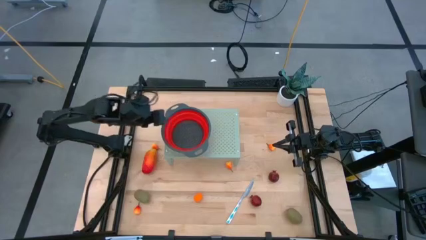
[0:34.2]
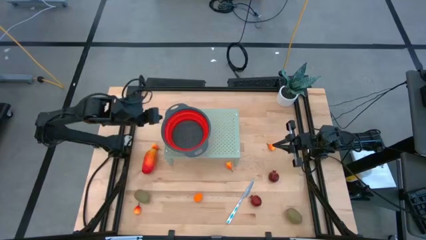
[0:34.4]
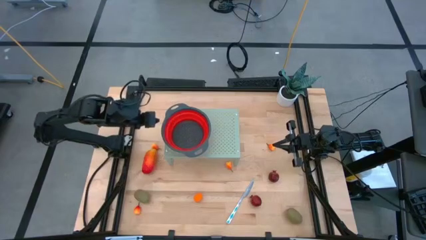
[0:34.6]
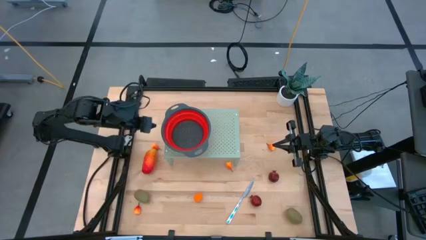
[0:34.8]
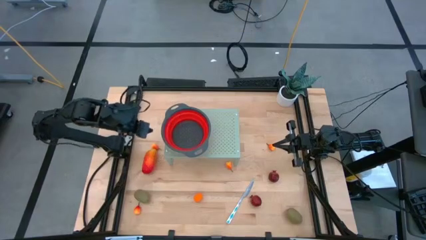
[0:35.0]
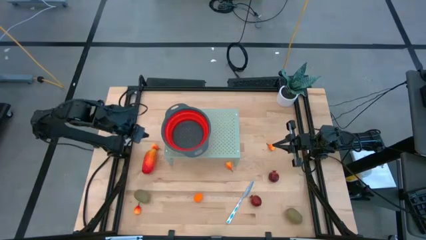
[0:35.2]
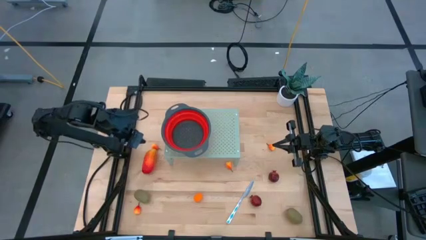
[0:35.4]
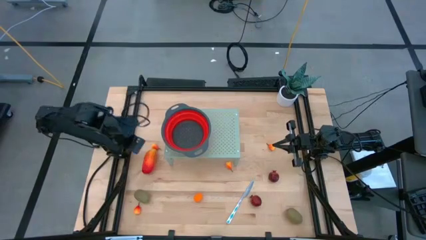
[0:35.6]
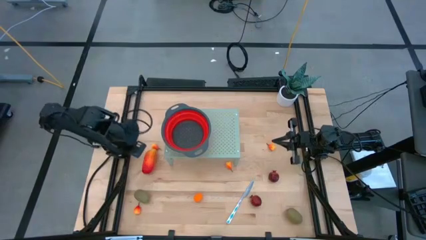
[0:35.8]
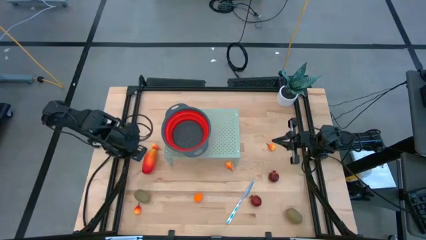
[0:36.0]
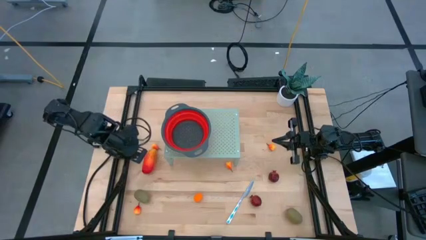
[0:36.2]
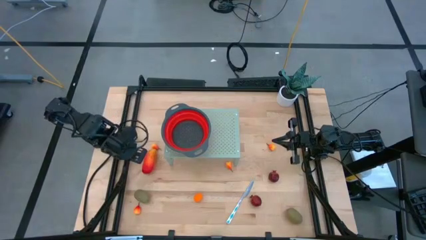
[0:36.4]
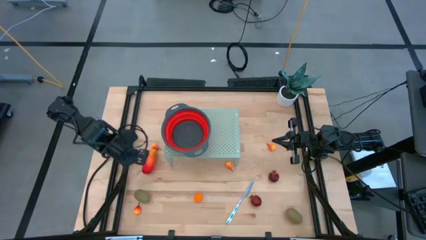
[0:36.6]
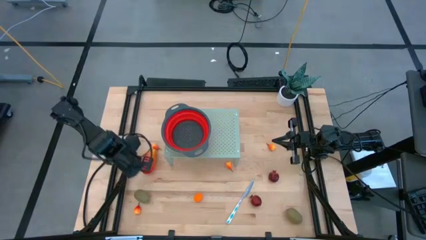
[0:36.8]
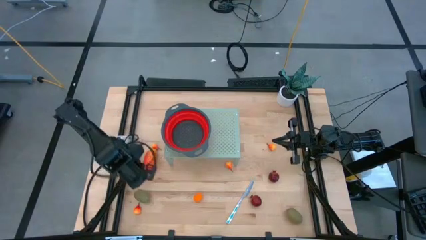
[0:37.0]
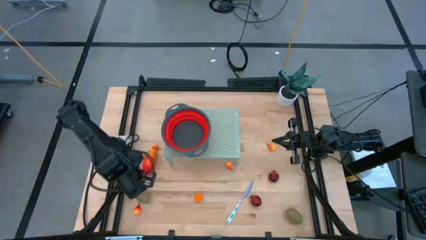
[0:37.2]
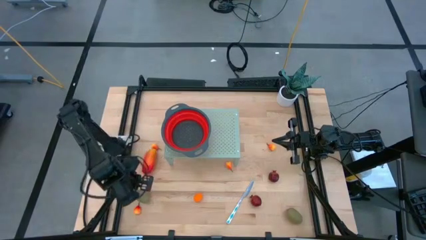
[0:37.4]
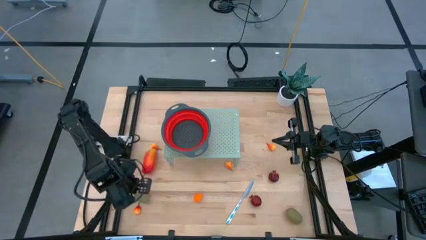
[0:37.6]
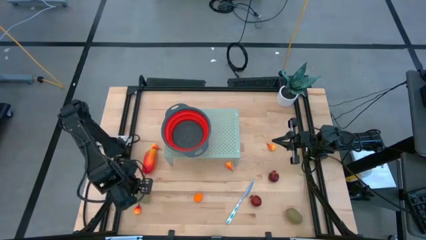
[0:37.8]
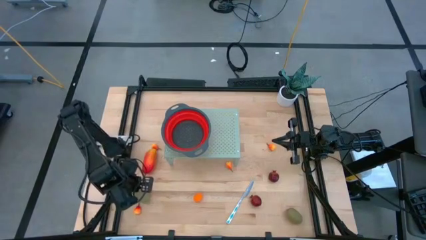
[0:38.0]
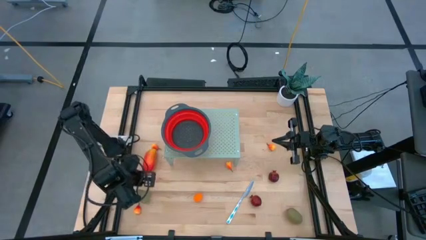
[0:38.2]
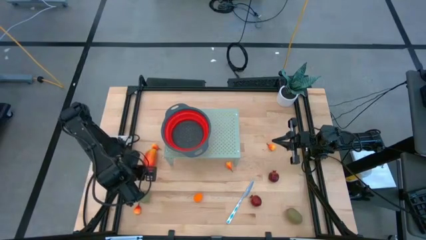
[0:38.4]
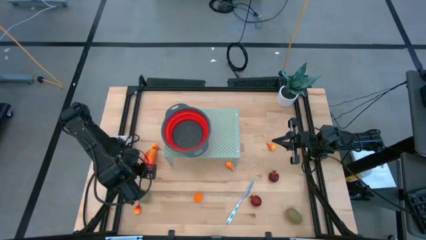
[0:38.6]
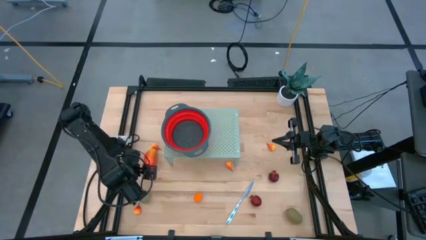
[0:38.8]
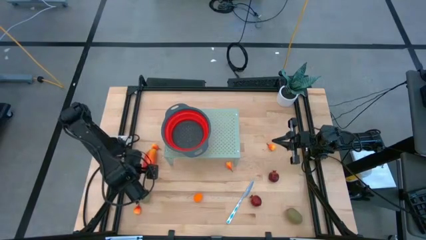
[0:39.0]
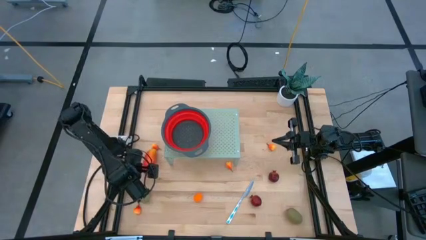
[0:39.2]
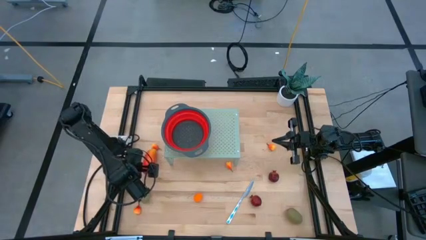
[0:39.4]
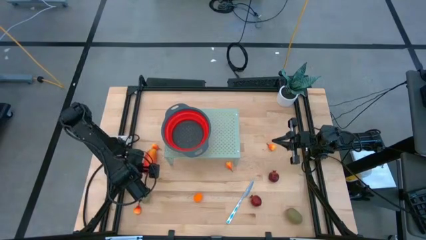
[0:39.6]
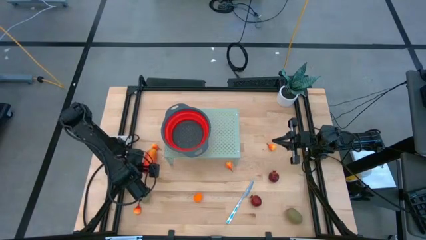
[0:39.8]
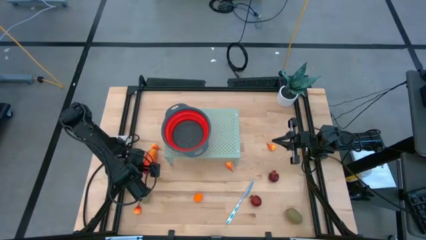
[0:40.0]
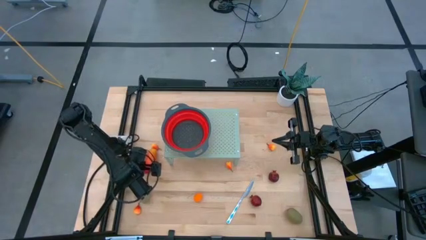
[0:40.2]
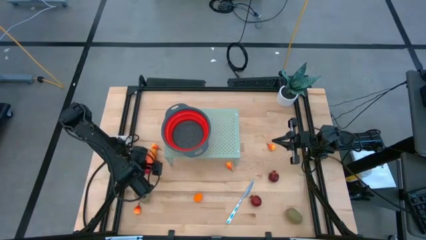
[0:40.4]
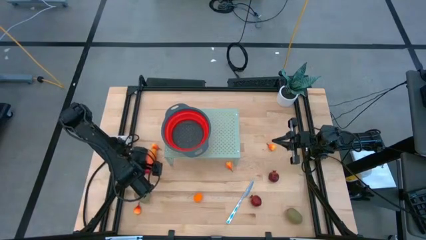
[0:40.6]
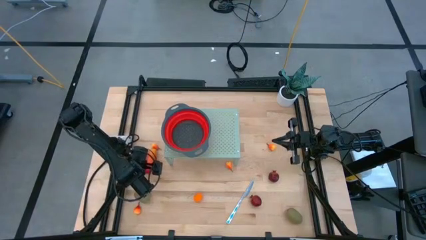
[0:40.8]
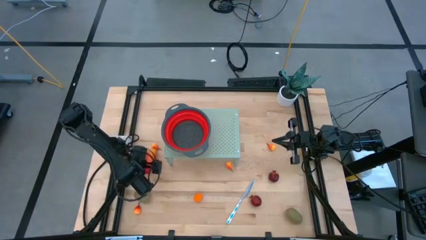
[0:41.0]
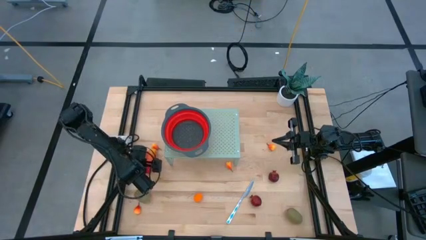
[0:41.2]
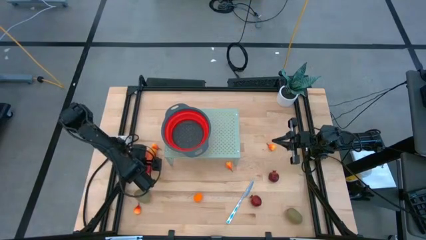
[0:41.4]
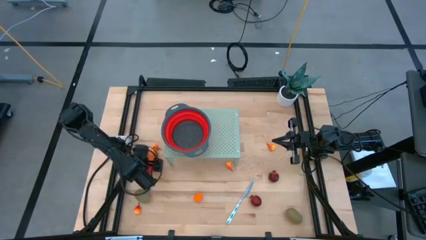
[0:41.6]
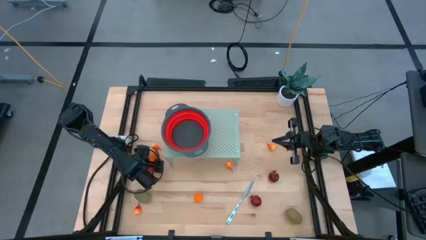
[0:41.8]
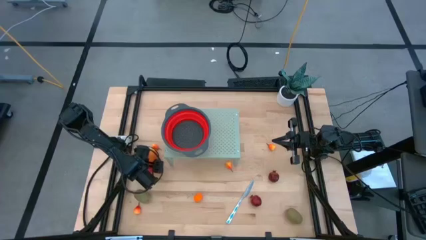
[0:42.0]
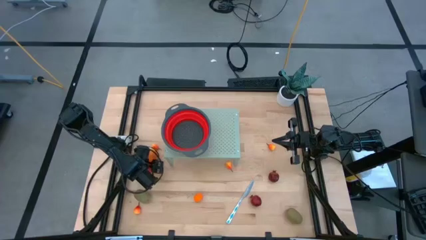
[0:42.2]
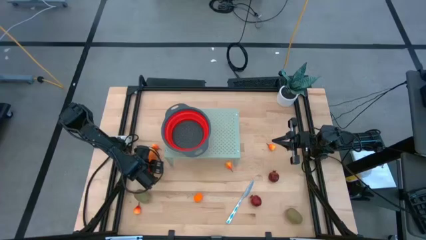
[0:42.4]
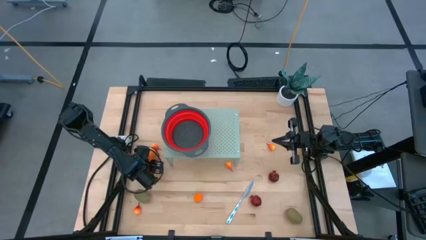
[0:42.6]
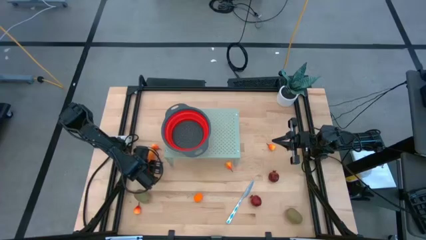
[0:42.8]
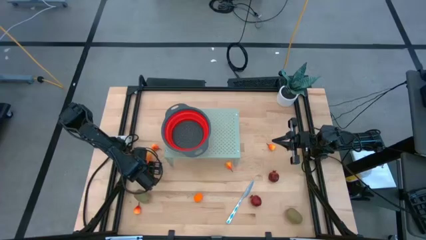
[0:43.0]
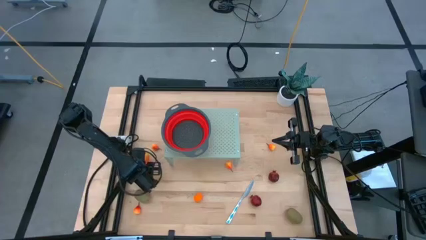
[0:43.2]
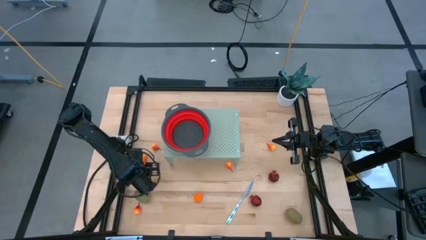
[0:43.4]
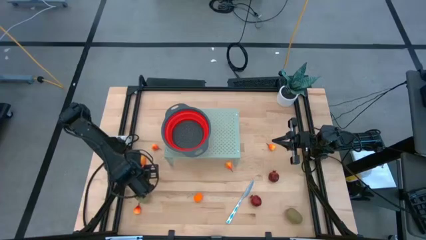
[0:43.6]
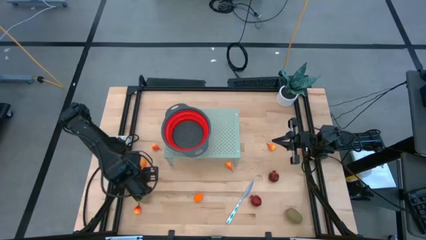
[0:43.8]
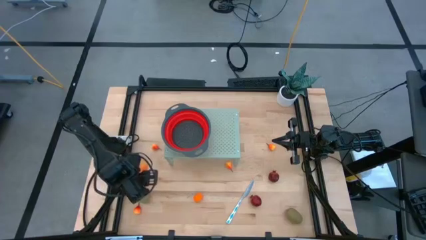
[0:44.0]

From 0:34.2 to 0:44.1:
Task: Pick & Place Fruit
Put the red mango into the red strainer bowl on the shelf

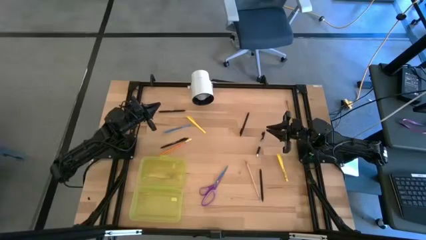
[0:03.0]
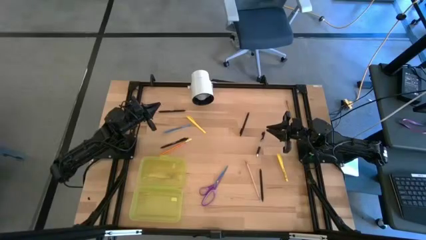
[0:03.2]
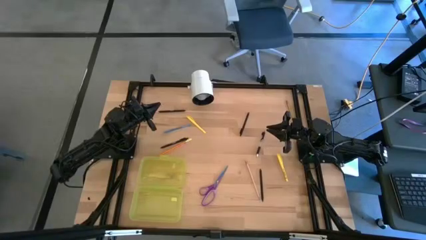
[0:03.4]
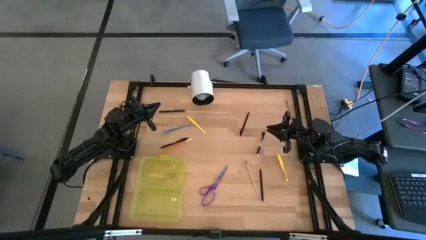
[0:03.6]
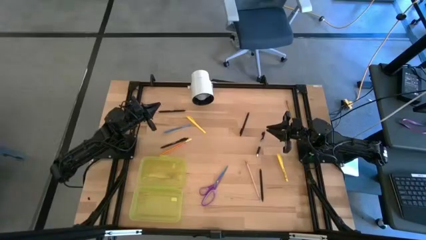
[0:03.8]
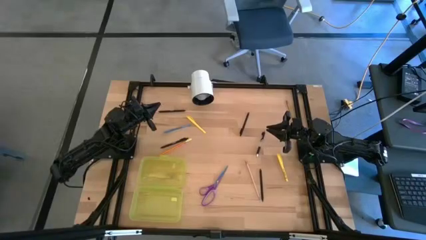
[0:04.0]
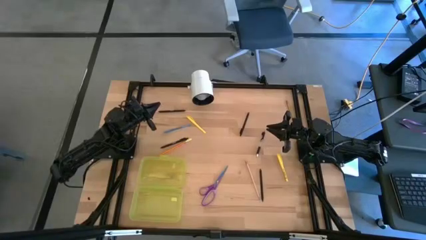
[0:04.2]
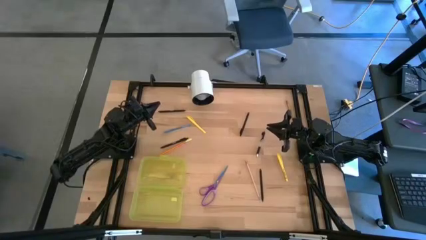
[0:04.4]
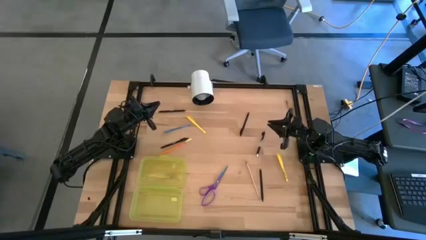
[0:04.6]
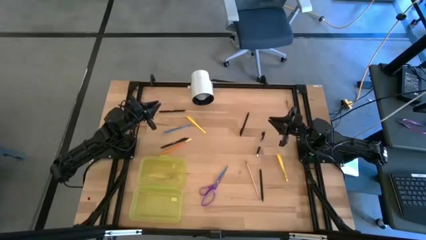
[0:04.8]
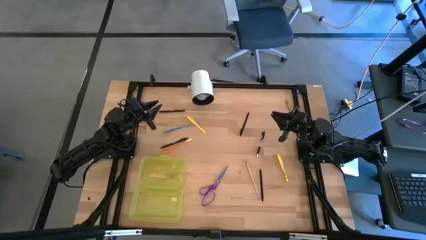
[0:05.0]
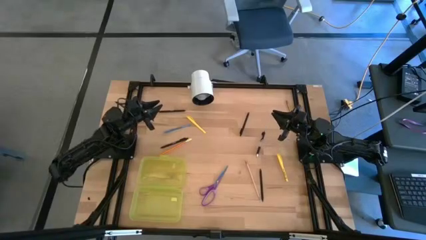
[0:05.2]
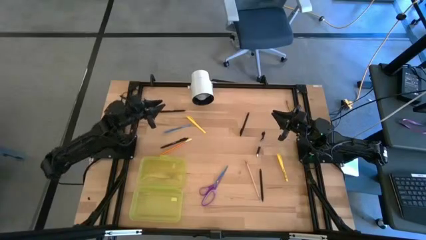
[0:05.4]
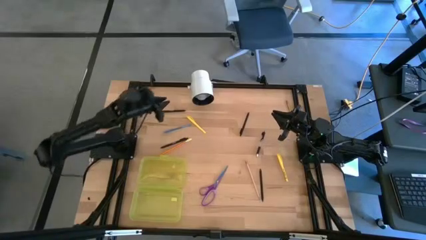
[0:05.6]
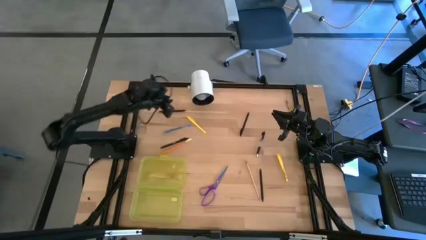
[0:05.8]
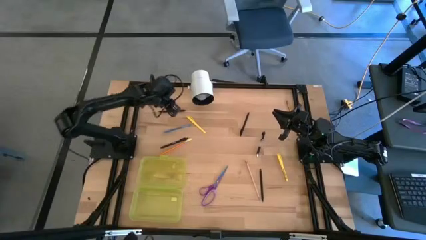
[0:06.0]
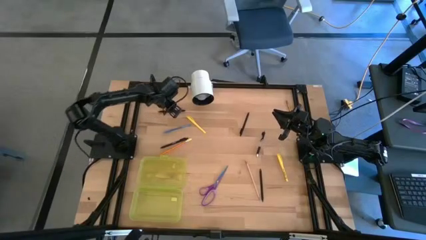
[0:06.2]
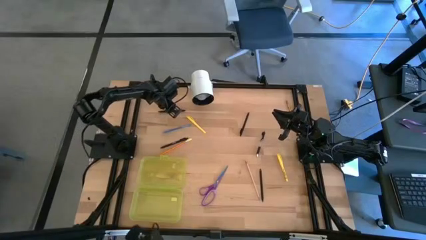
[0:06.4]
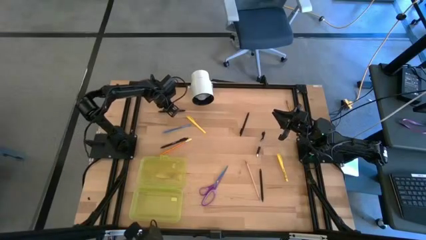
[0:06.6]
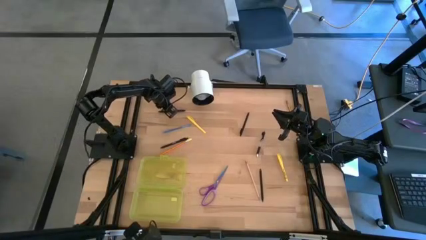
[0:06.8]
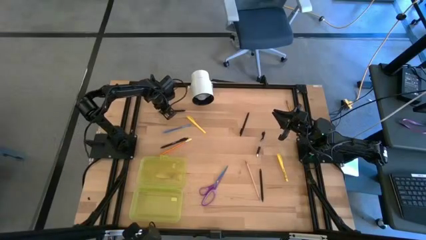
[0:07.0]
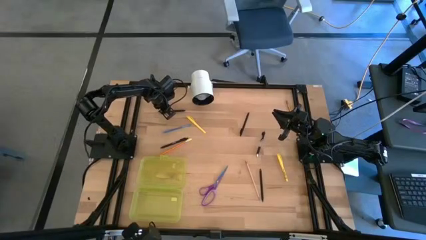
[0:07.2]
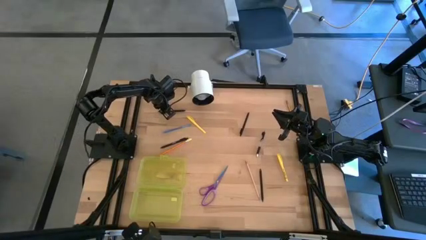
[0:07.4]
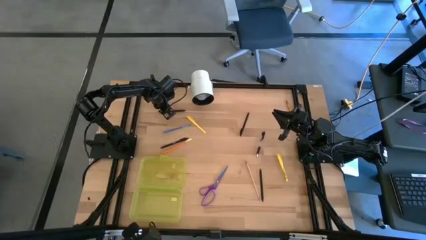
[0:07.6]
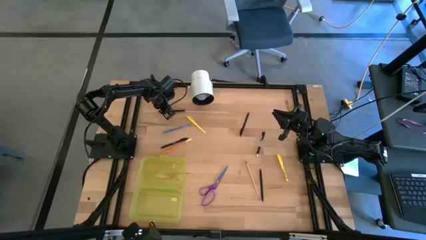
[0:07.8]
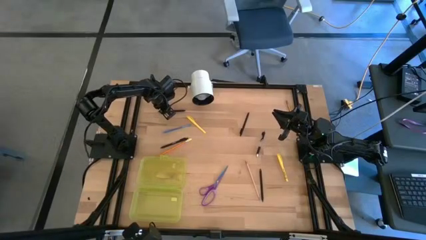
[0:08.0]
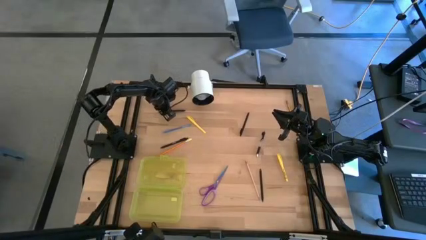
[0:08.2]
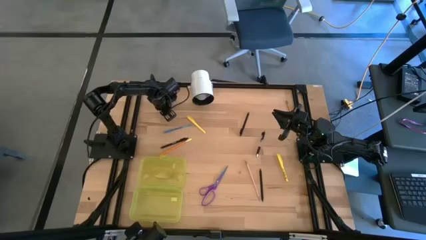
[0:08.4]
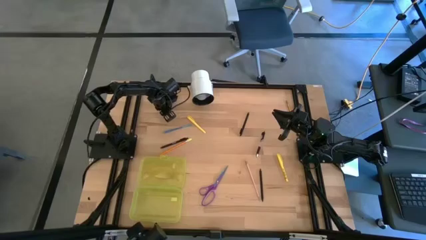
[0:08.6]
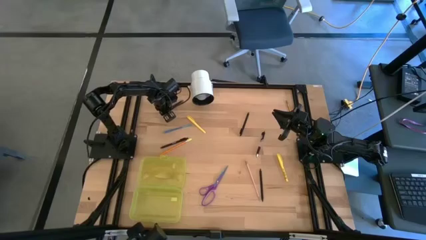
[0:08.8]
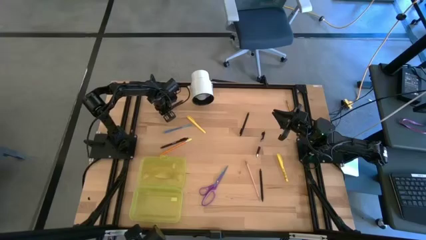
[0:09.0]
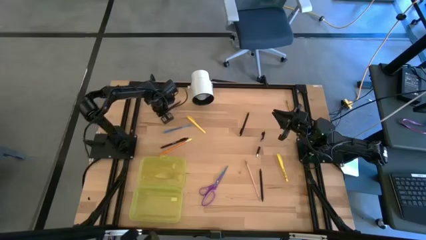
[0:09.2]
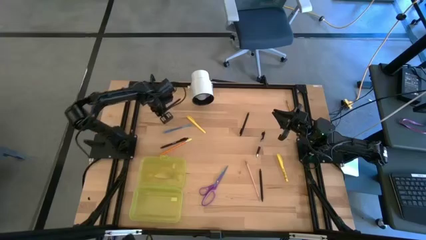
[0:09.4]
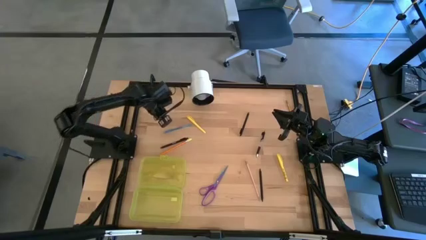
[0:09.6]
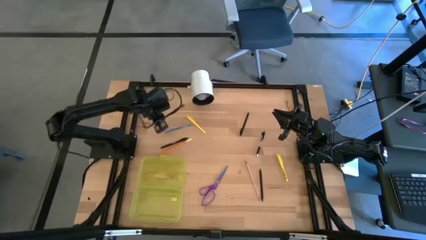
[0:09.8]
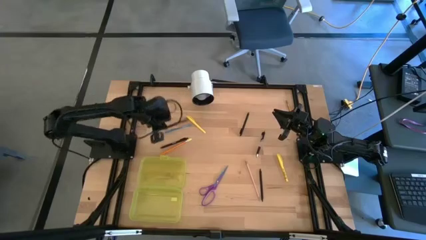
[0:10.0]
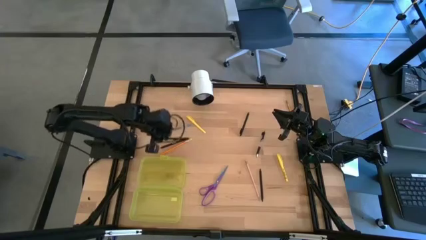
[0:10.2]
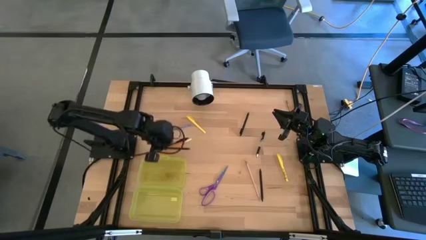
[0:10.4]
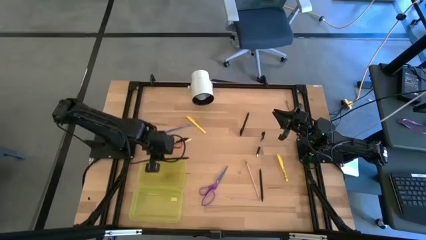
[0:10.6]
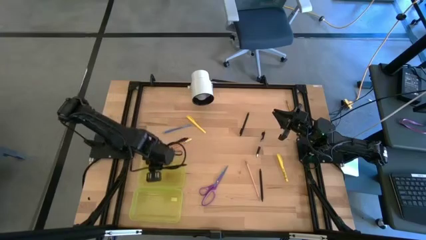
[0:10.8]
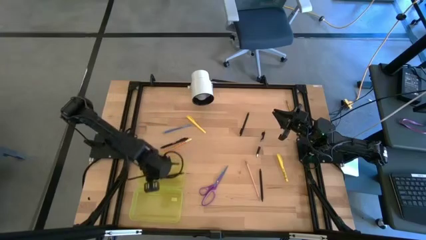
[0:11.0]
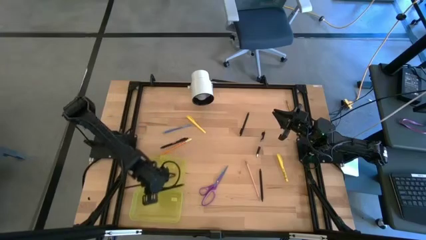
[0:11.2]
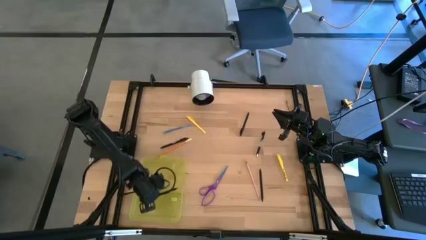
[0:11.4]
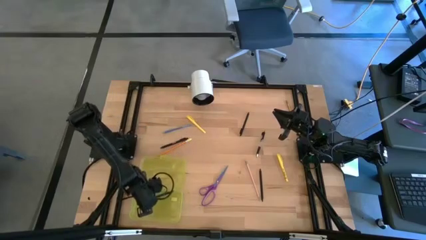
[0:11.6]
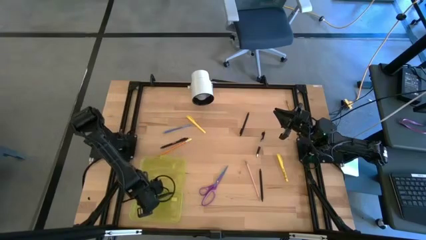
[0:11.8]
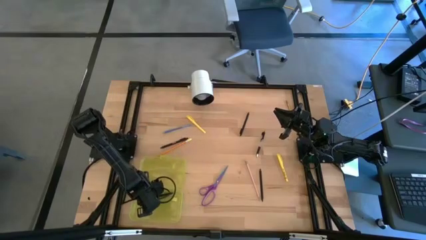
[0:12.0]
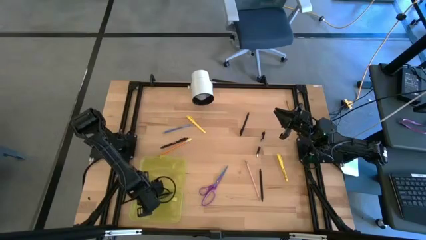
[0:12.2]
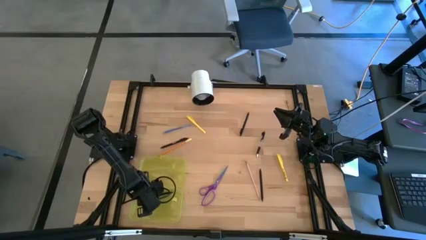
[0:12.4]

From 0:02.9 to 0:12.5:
Task: Pick & place school supplies into a supply box
Put the black pen into the yellow supply box
